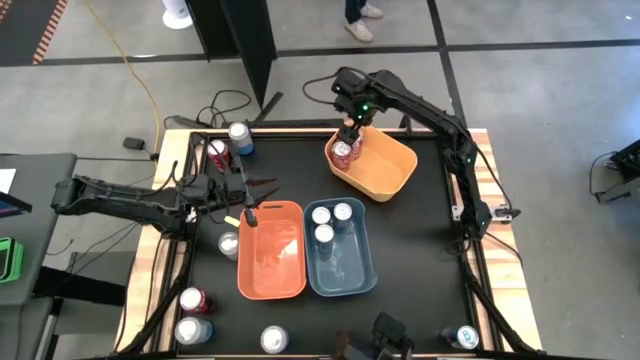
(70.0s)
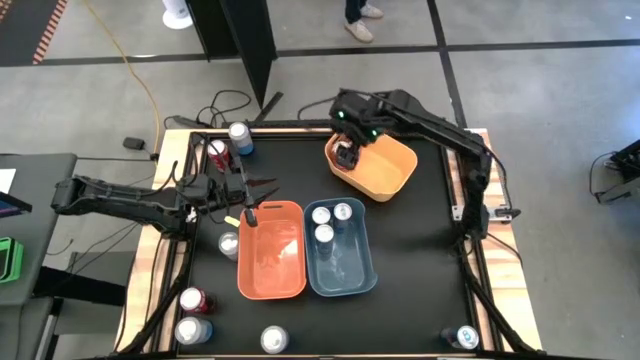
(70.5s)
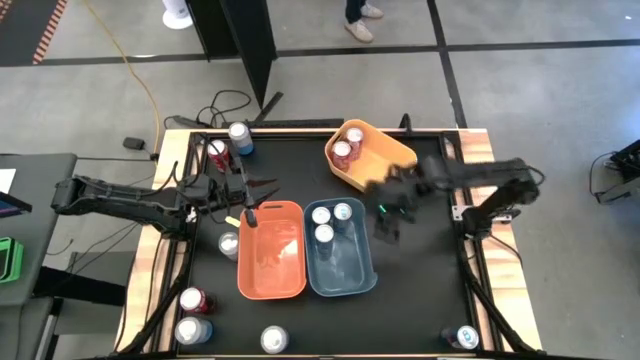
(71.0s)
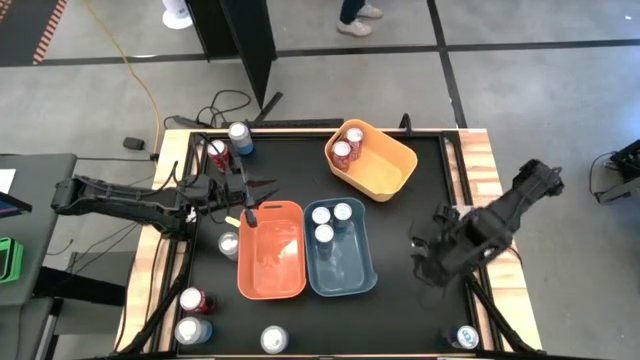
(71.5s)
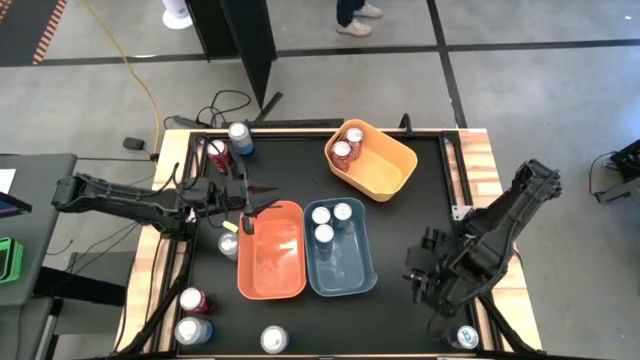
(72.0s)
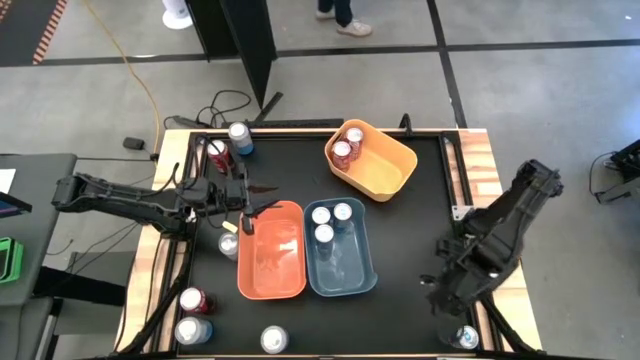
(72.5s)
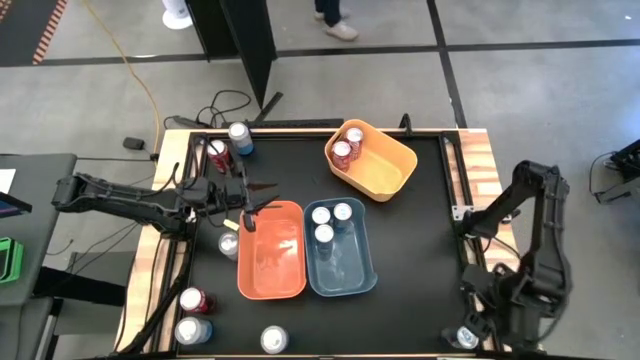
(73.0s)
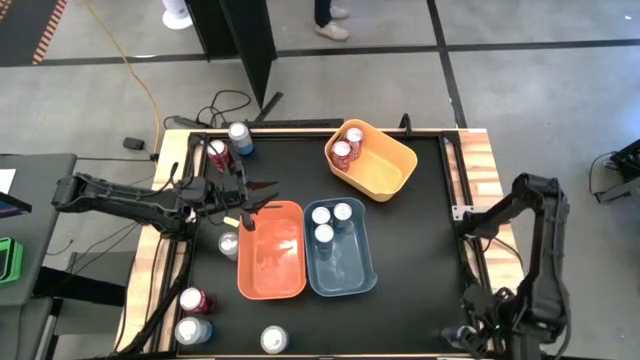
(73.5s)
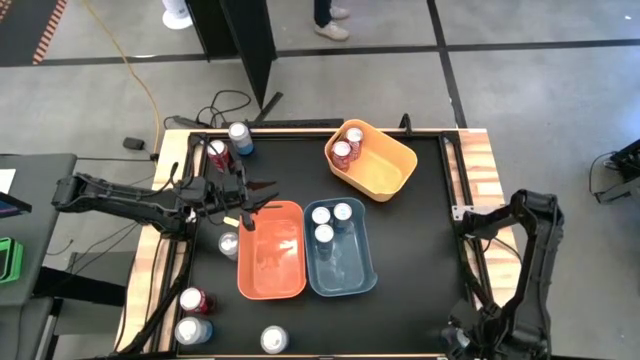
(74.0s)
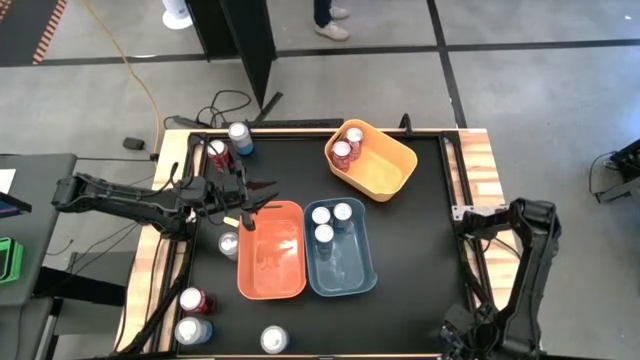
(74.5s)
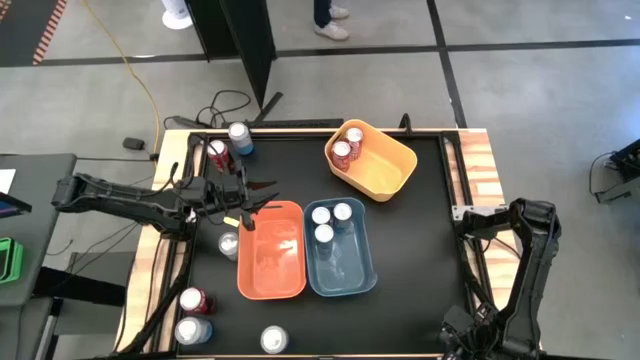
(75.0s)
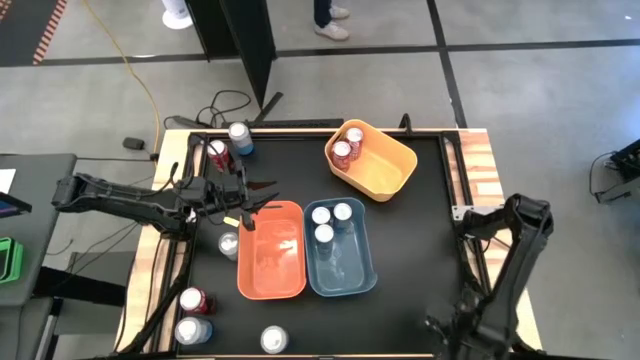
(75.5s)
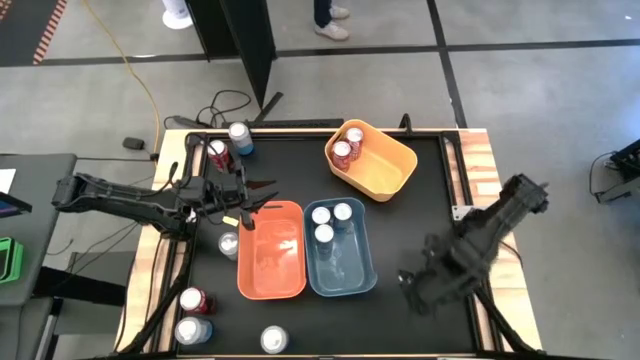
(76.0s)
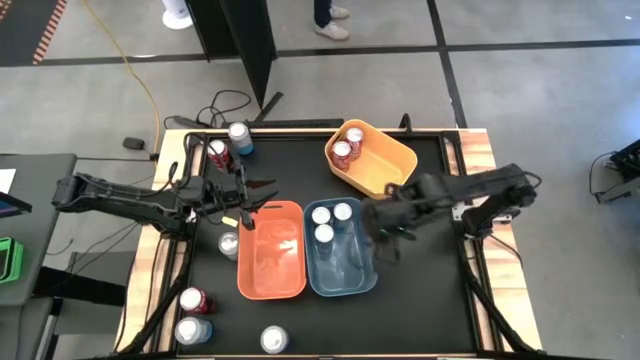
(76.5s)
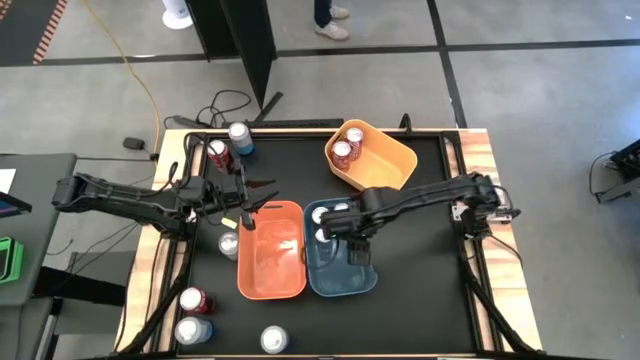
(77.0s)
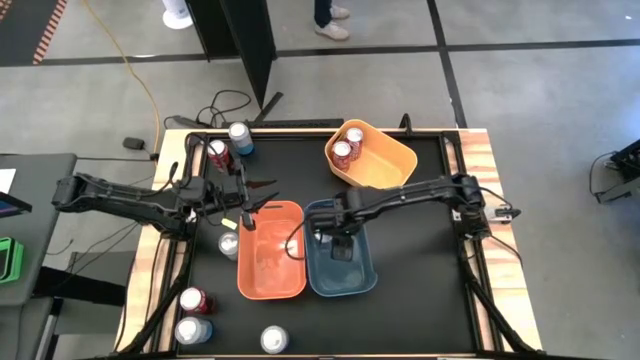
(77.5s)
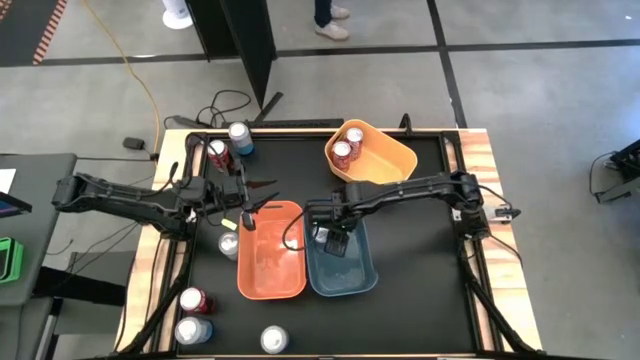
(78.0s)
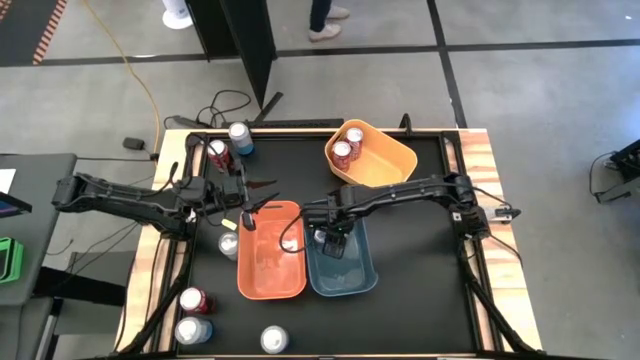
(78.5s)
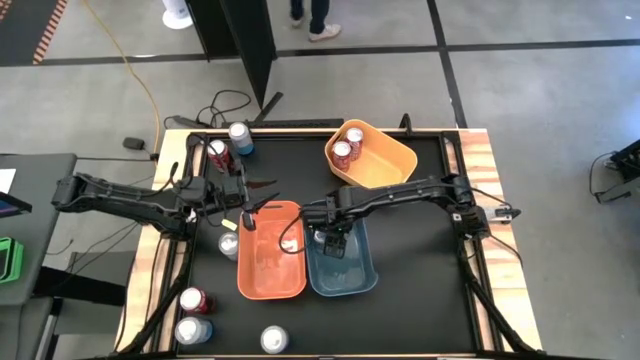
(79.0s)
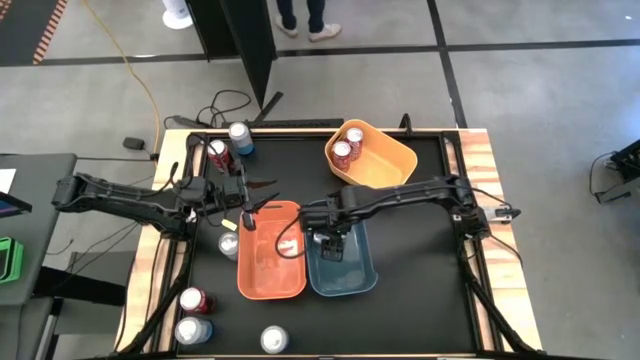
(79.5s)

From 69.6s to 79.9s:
Task: Sort soda cans
Put the blue soda can into the blue bin

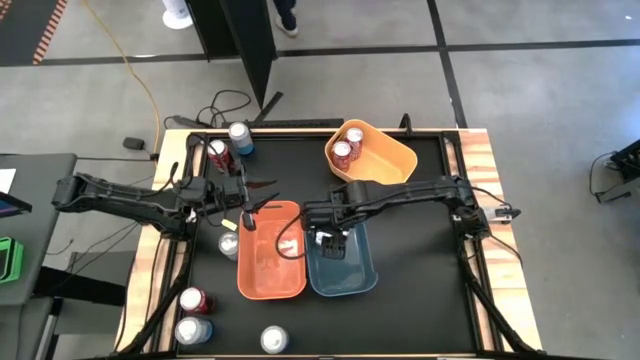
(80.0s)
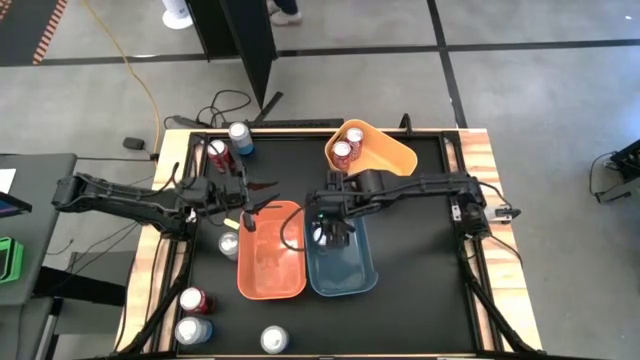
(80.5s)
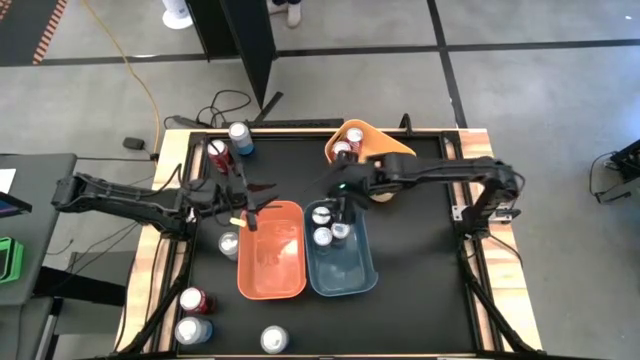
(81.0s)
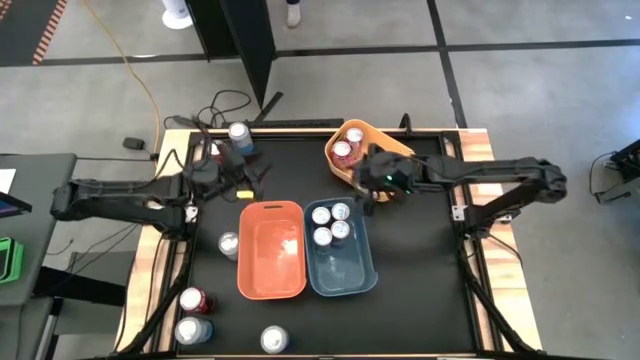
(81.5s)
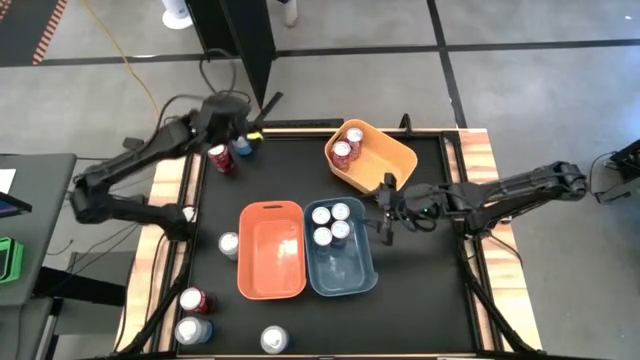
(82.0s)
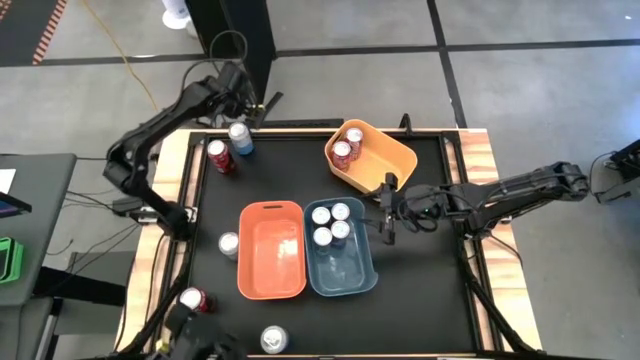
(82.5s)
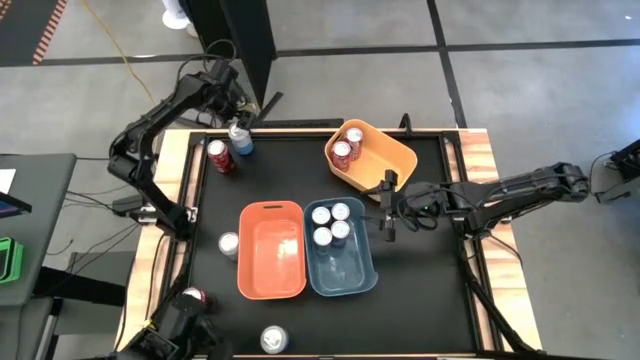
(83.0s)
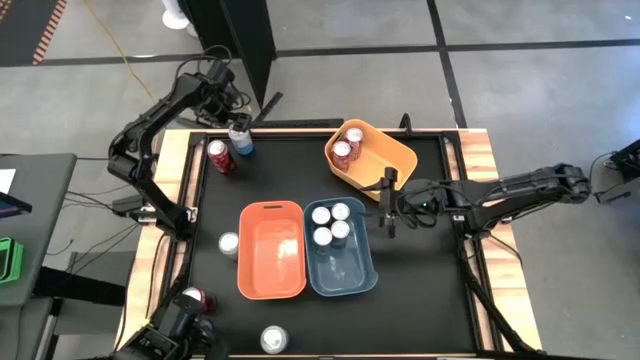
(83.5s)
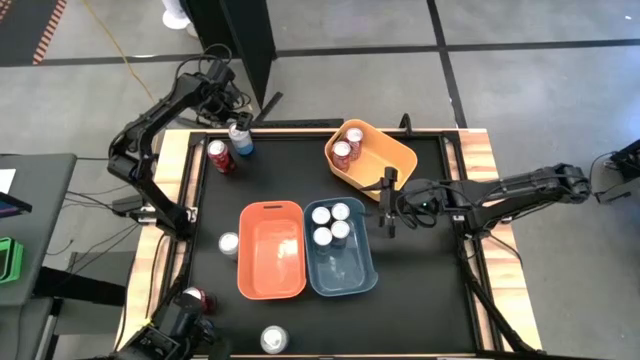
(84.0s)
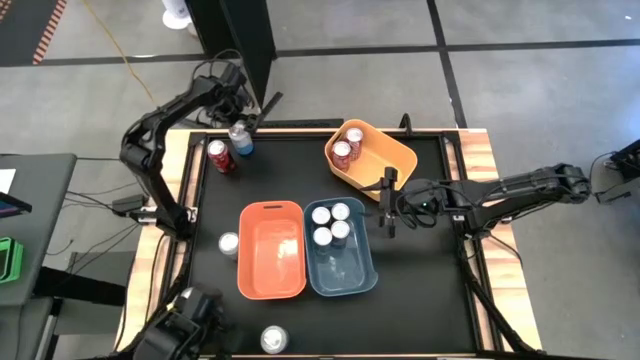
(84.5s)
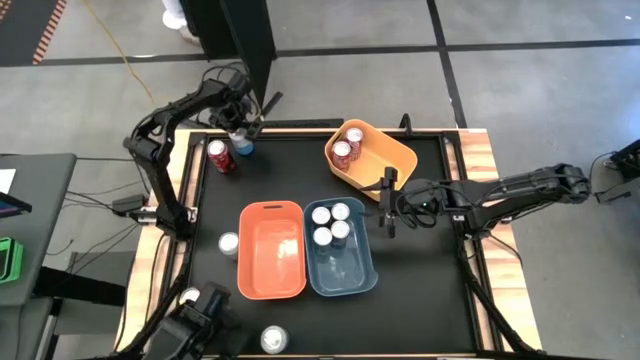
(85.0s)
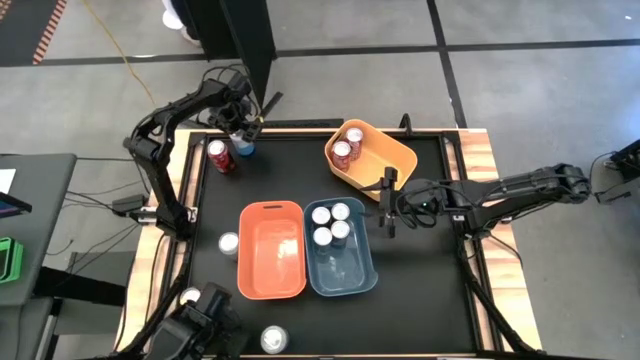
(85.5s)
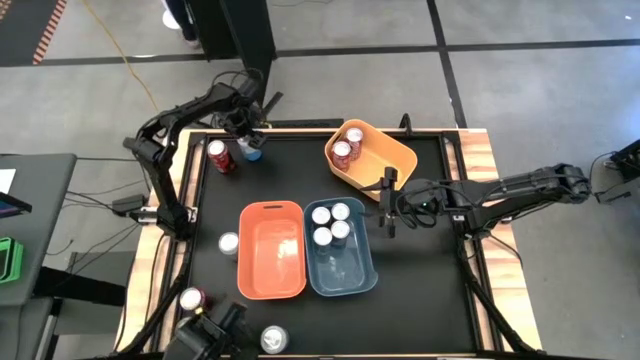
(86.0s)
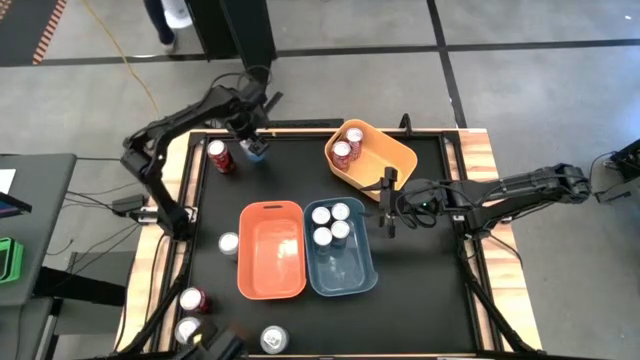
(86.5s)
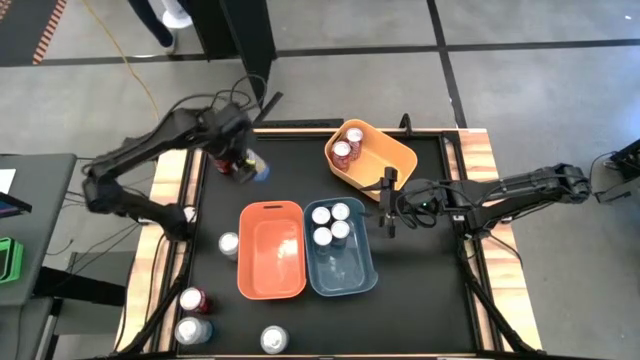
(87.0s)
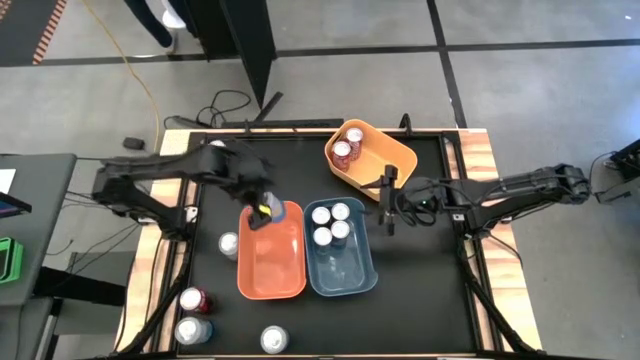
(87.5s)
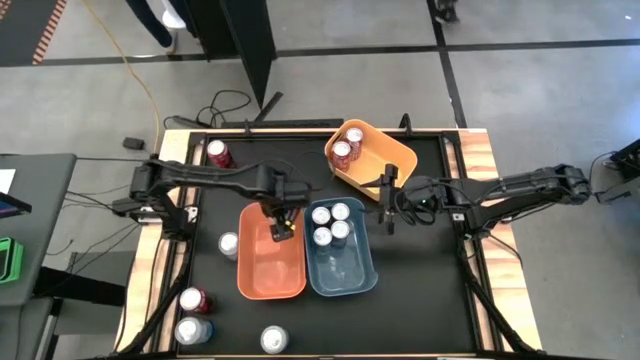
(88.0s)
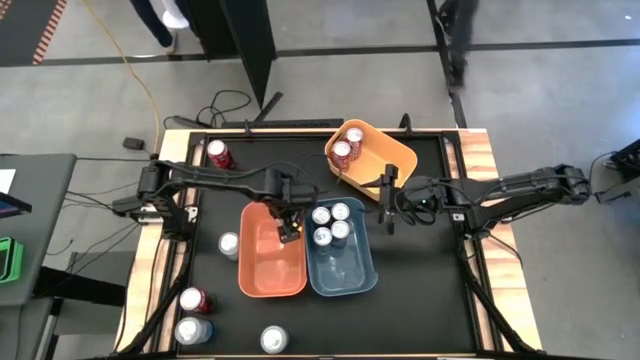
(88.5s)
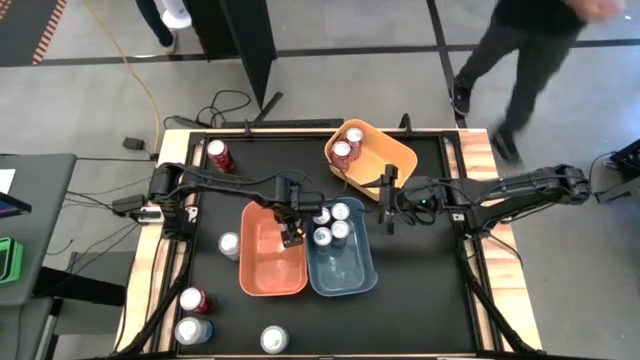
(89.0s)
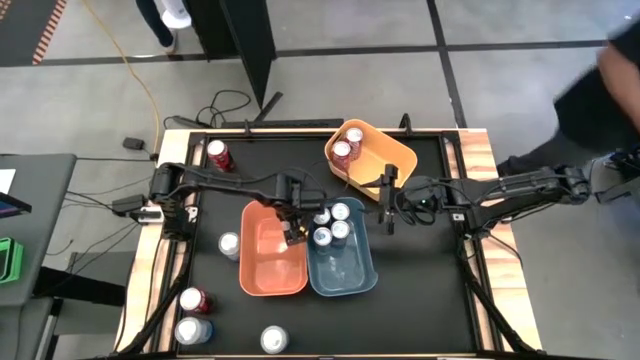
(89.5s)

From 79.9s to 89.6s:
Put the top left blue and white soda can into the orange bin

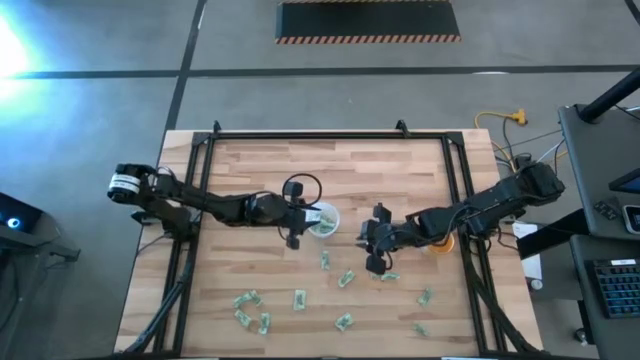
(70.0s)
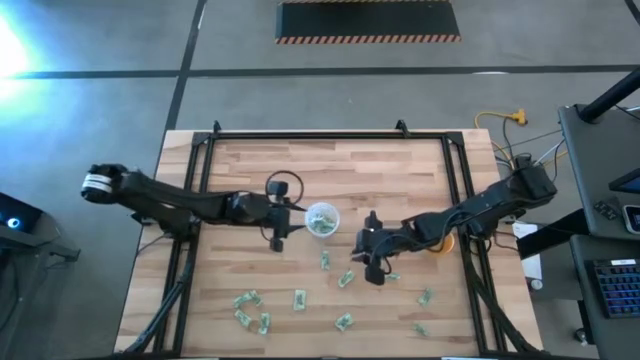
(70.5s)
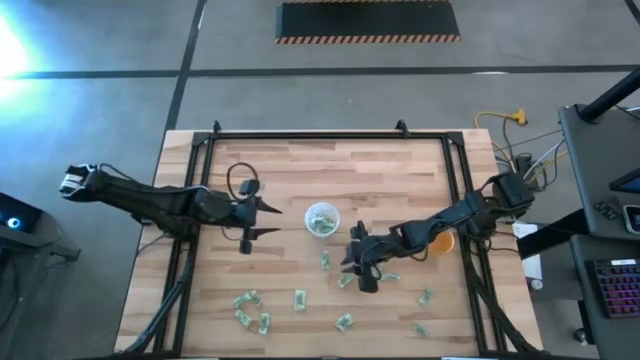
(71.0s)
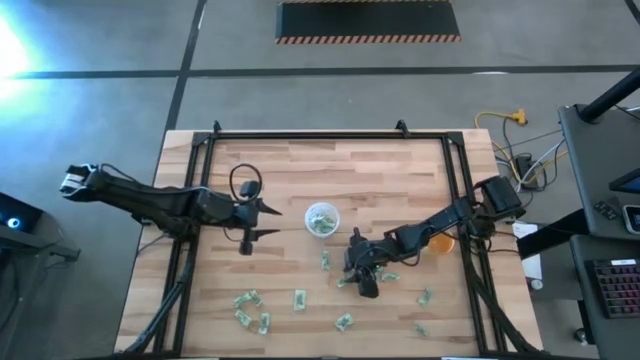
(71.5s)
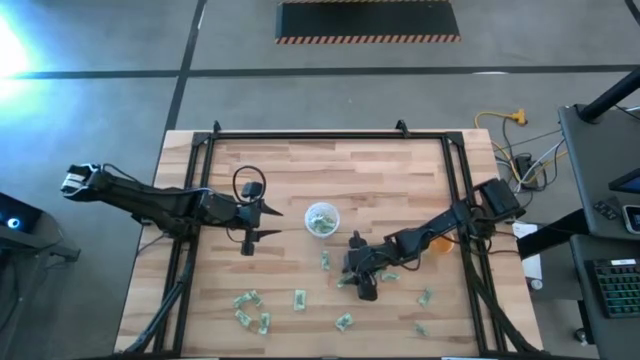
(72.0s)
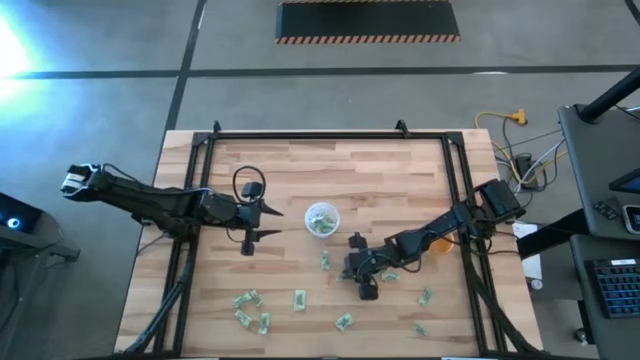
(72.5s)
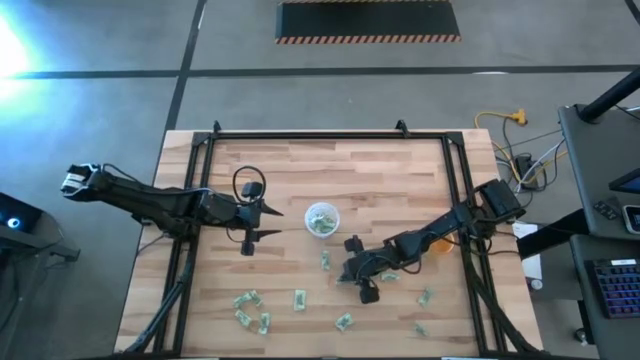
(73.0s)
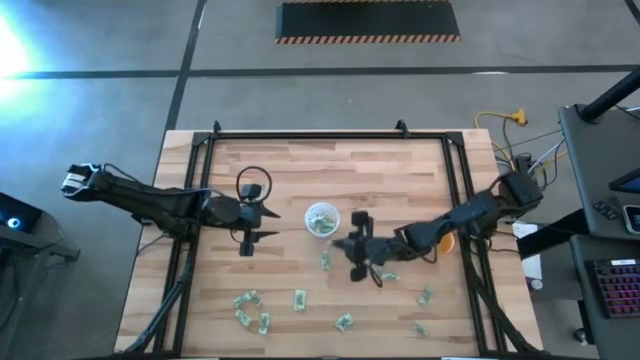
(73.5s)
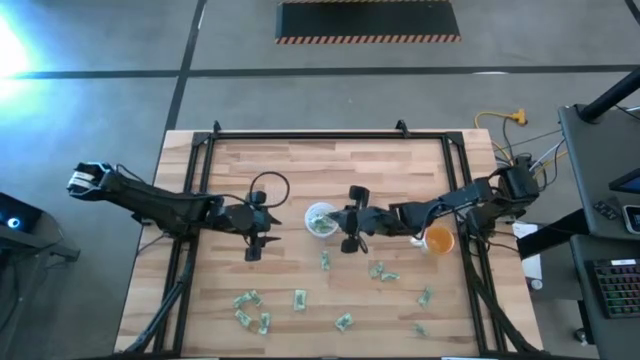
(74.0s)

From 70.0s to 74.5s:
Task: Pick and place Stevia / Truvia into bins
Put the light green stevia packet into the transparent container
